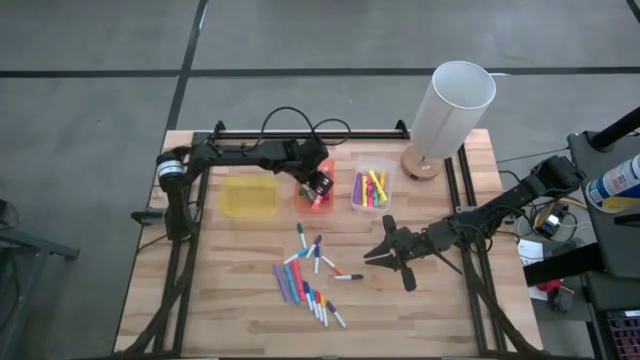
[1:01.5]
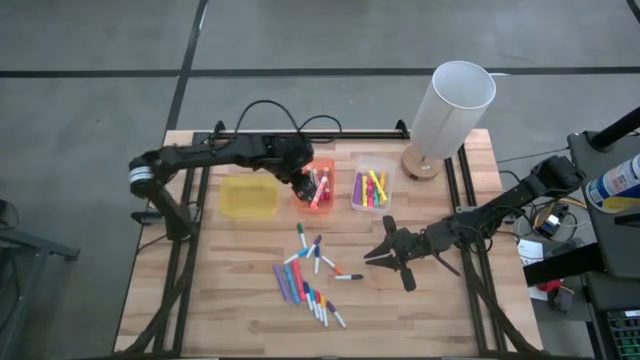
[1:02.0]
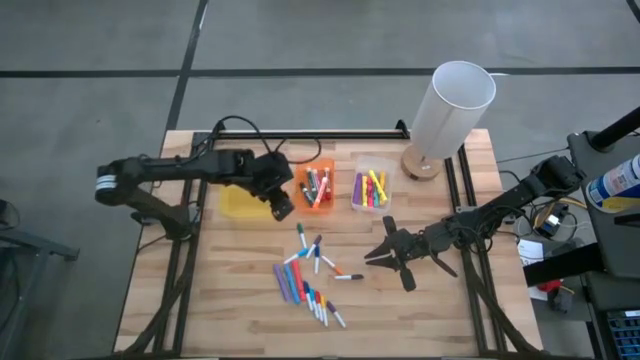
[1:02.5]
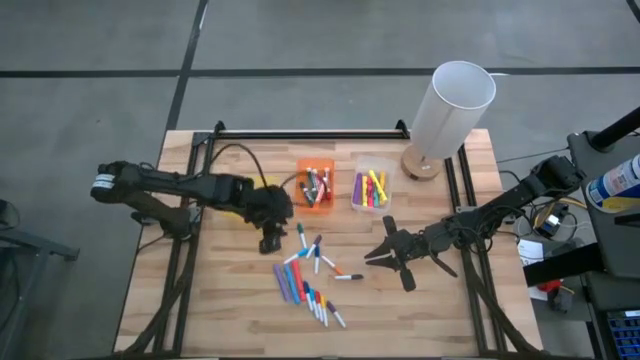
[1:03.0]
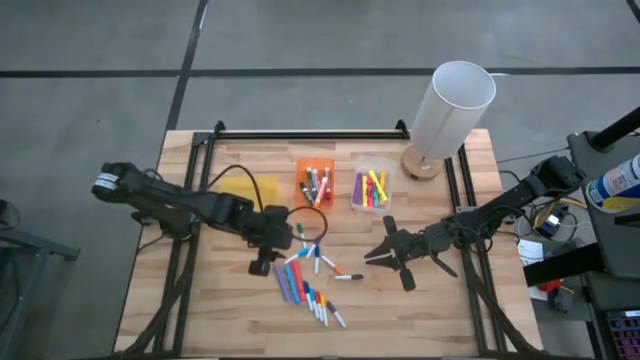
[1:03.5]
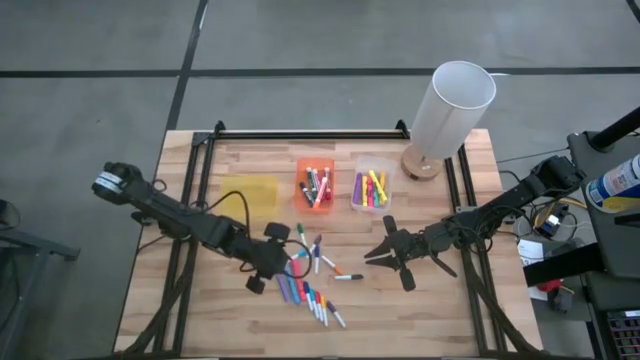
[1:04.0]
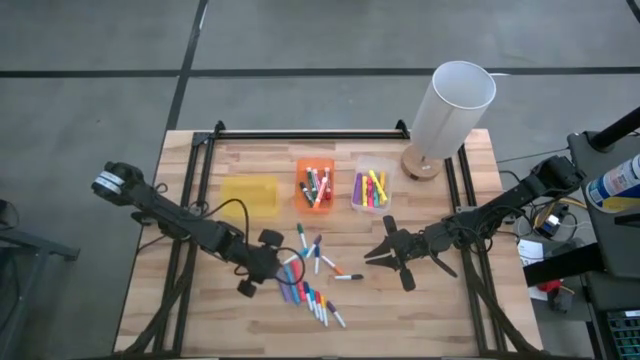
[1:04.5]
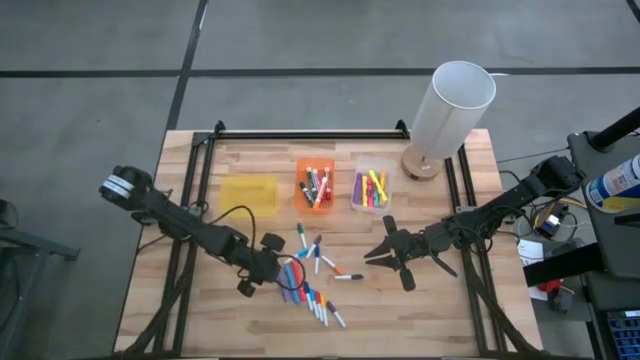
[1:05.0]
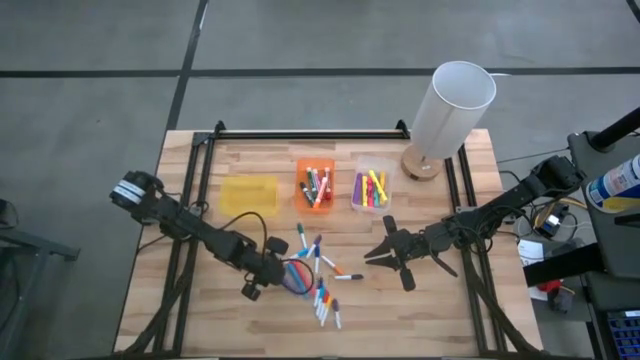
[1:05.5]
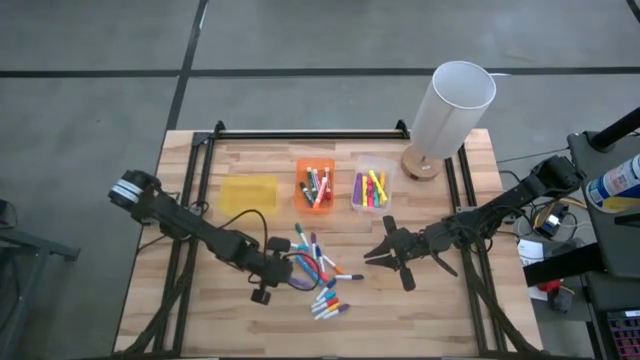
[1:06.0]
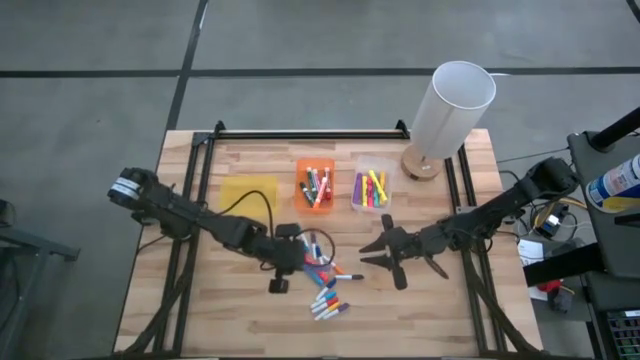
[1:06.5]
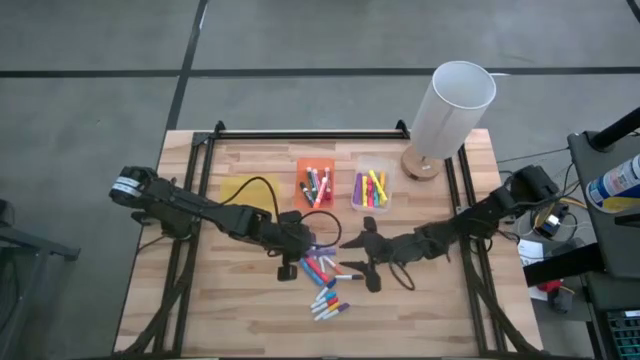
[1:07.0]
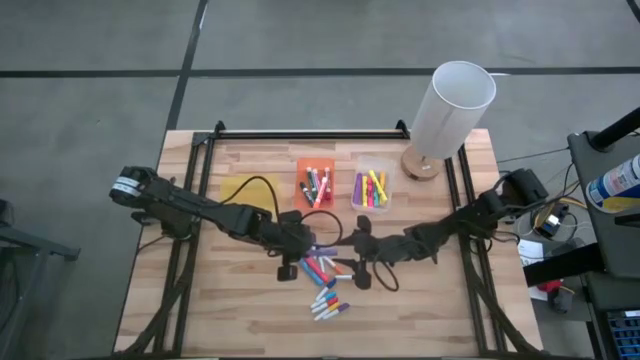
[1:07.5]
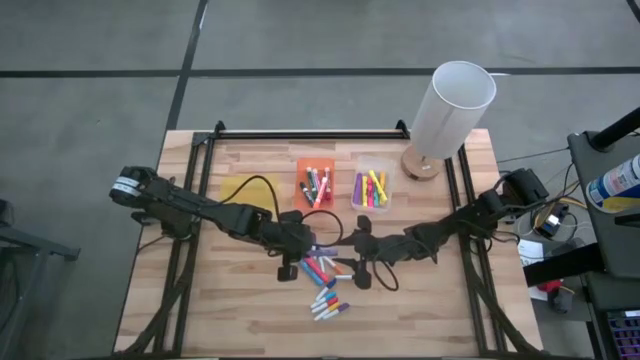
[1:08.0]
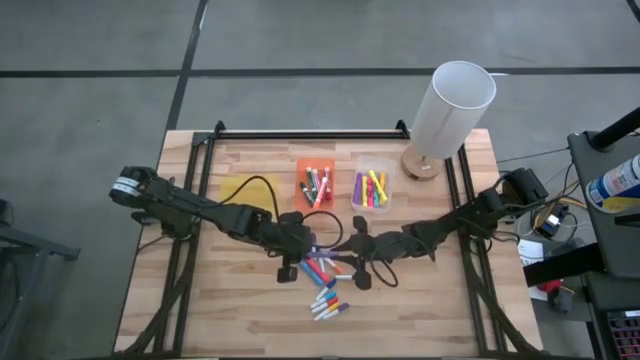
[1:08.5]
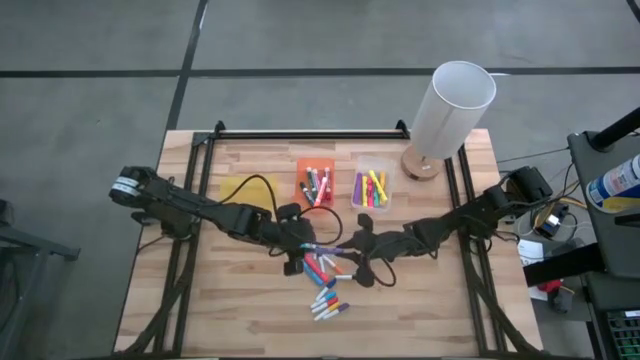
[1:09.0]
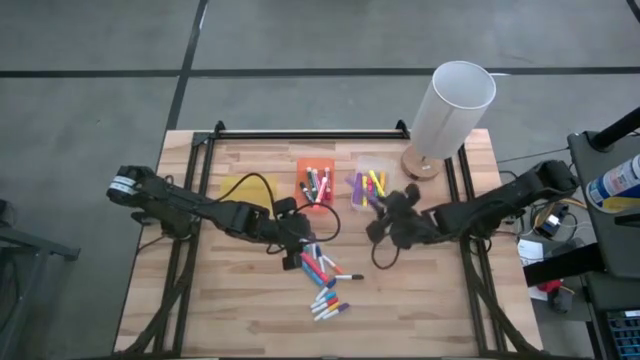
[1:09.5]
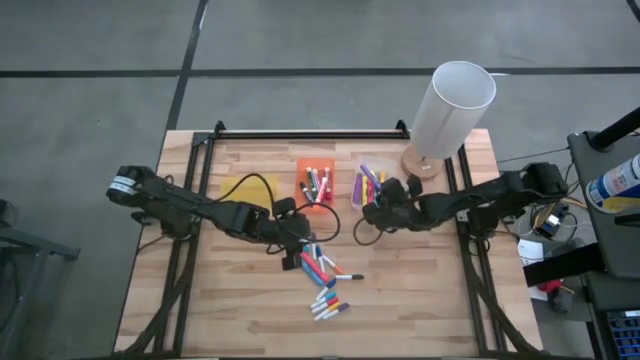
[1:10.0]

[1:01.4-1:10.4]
Task: Pick & Place Markers
Put the purple highlighter into the transparent bin

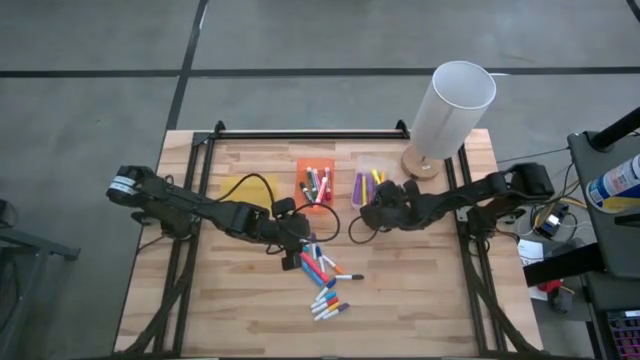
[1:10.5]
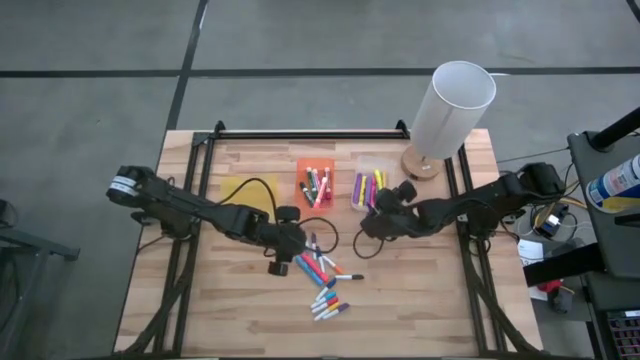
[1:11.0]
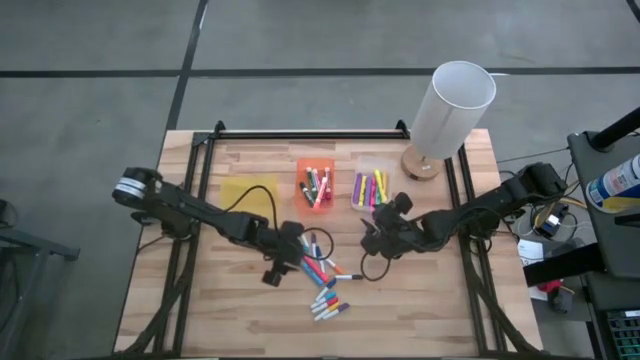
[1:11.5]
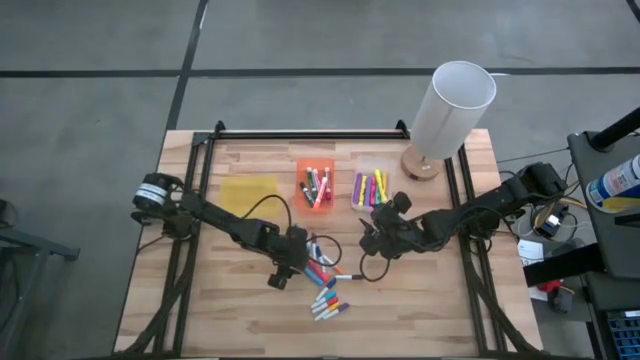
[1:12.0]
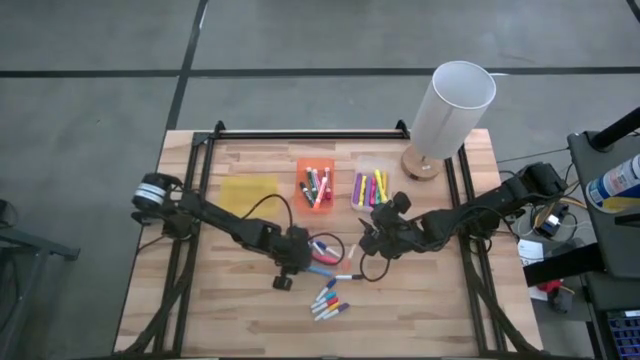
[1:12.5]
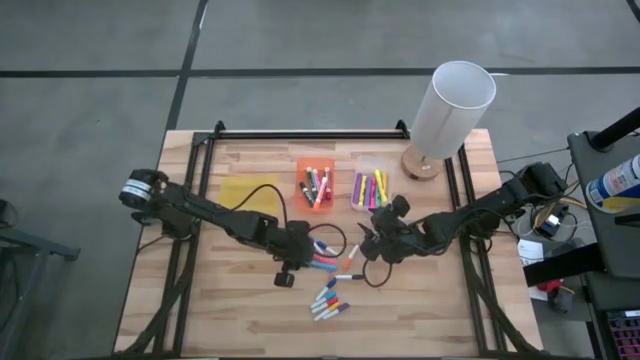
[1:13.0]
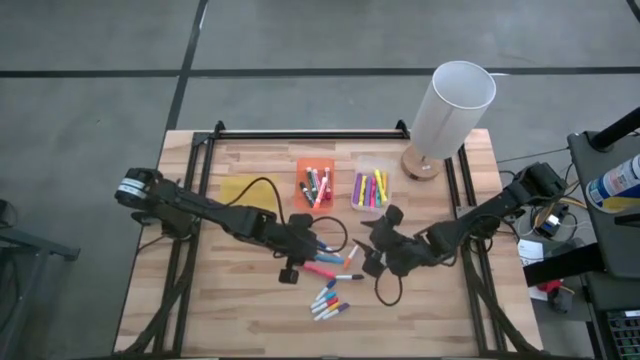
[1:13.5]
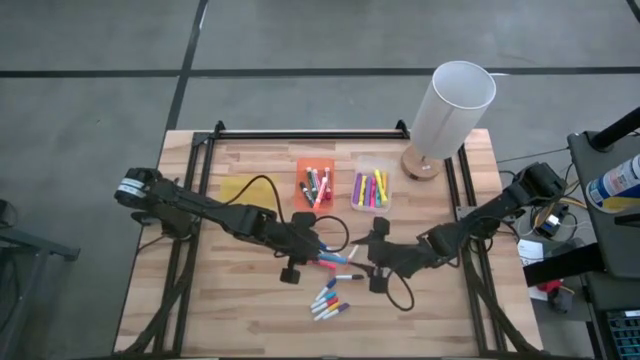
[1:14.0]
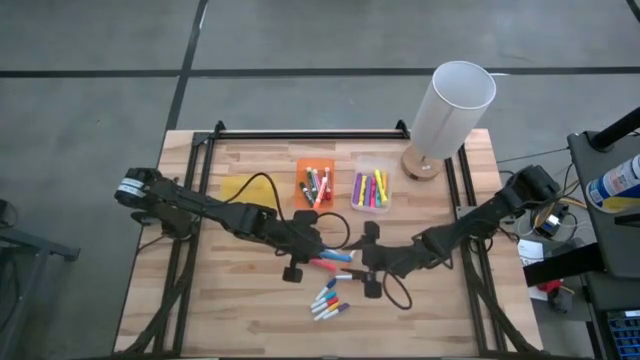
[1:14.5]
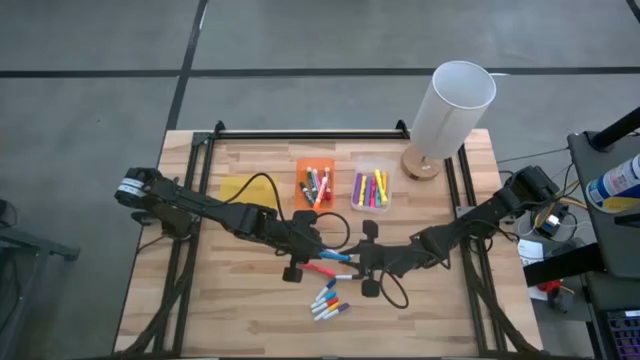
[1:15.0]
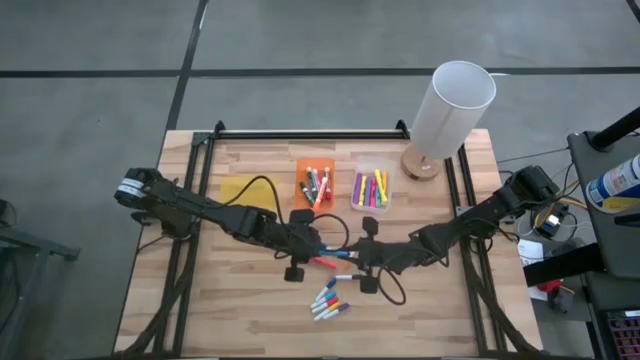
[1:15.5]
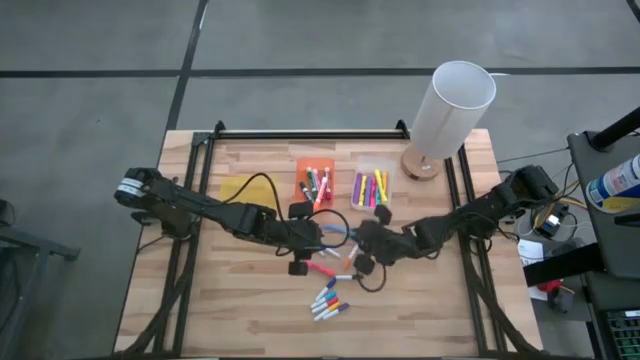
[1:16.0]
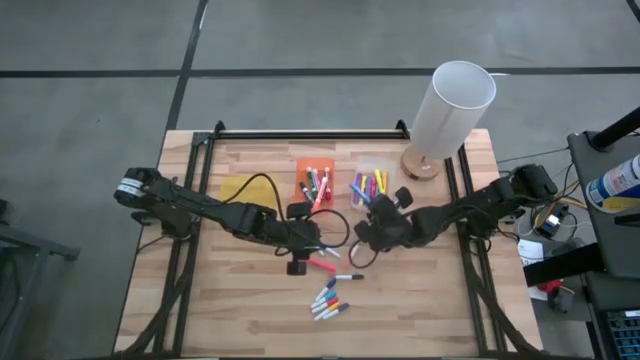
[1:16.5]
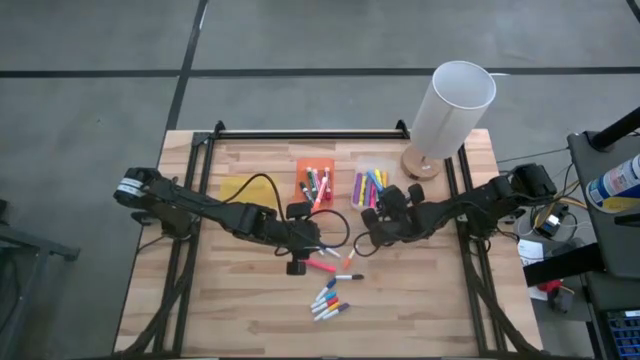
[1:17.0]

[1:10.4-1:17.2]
Put the blue highlighter into the transparent bin

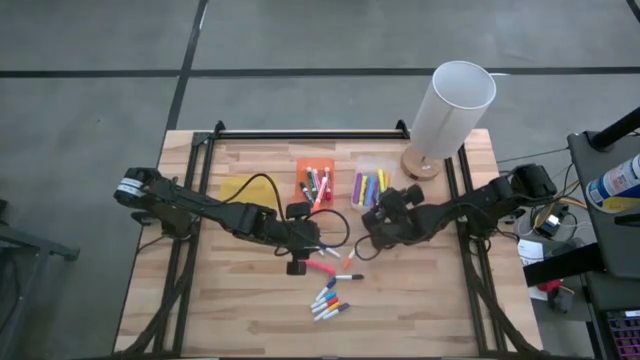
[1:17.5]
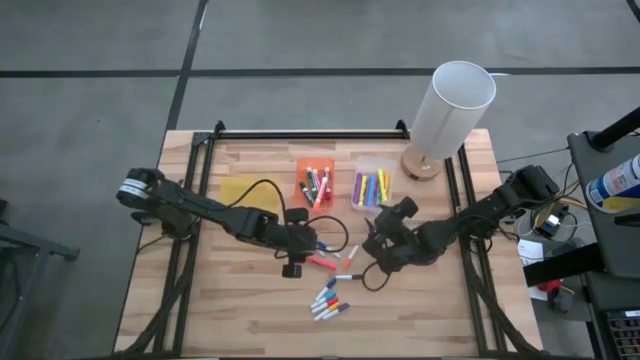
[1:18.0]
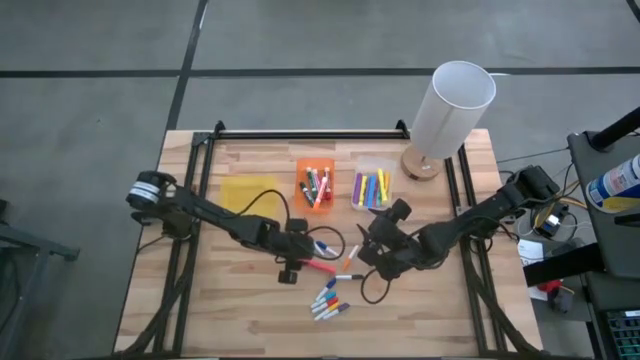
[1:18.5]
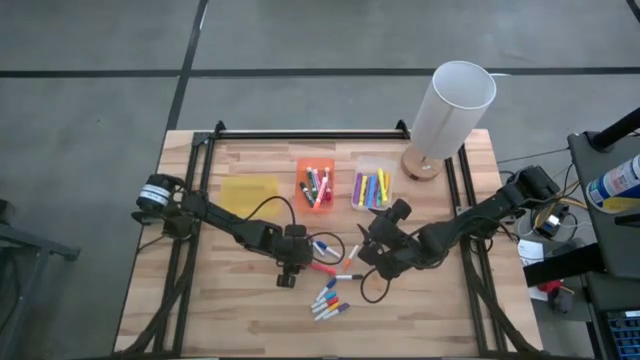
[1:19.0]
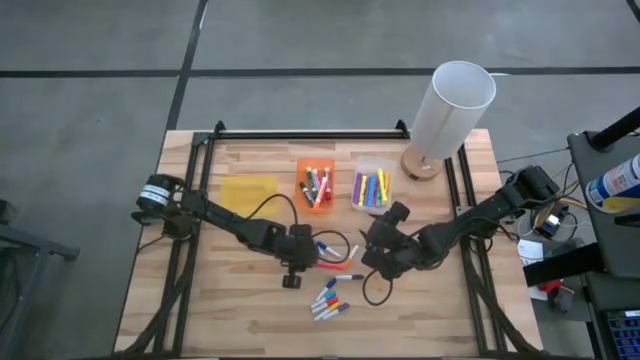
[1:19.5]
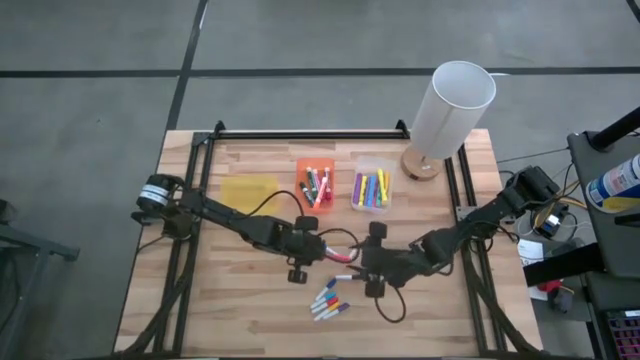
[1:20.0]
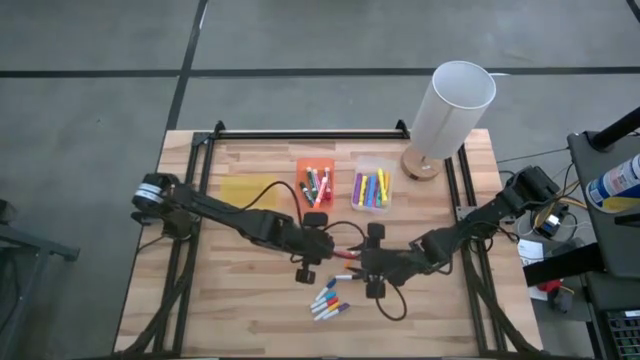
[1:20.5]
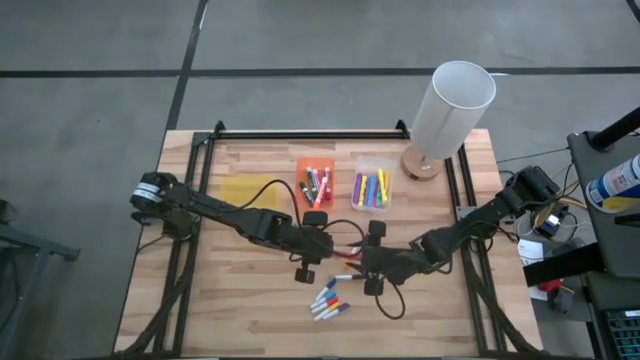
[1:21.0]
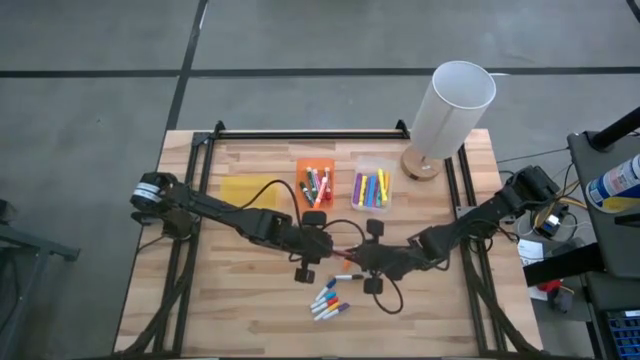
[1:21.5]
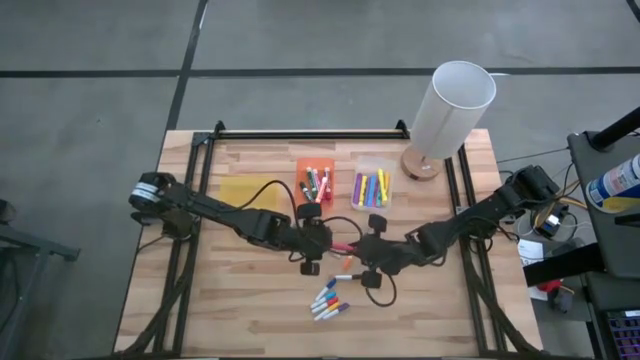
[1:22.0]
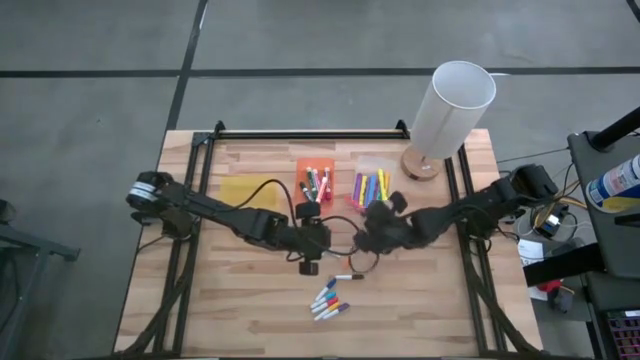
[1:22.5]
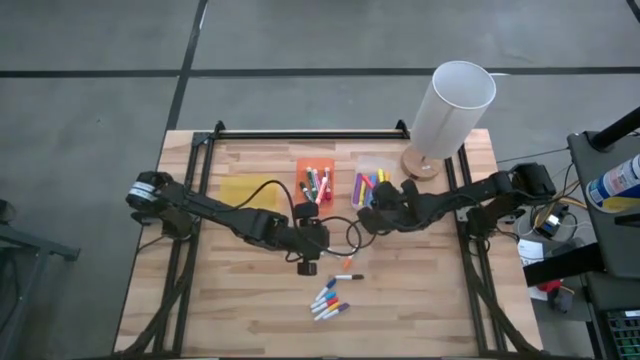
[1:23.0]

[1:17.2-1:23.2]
Put the dark pink highlighter into the transparent bin
